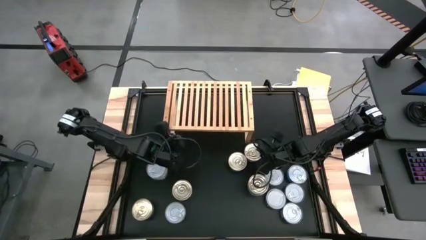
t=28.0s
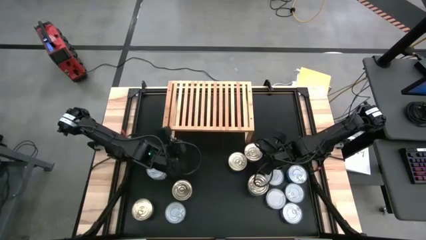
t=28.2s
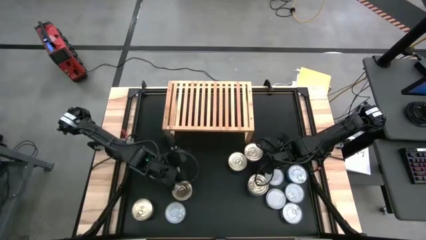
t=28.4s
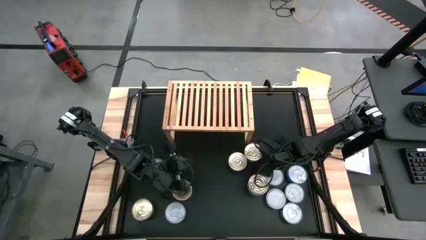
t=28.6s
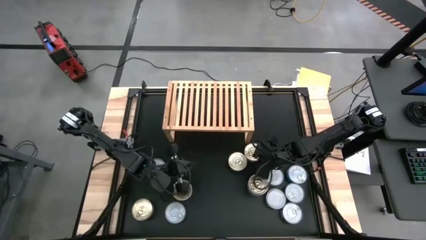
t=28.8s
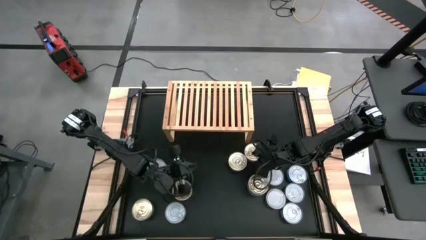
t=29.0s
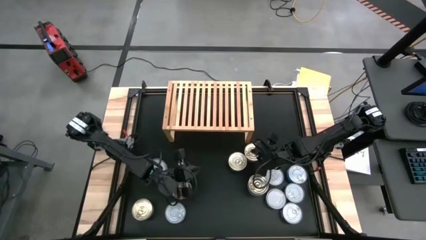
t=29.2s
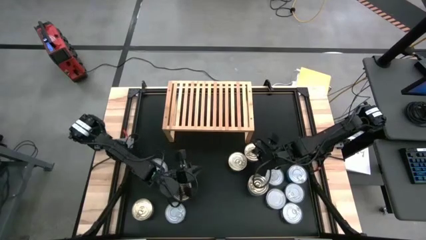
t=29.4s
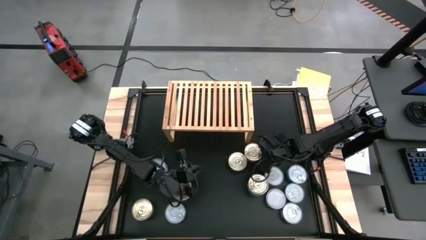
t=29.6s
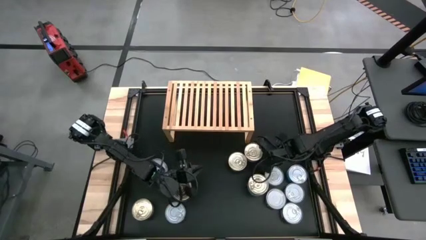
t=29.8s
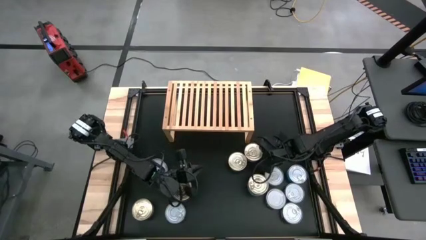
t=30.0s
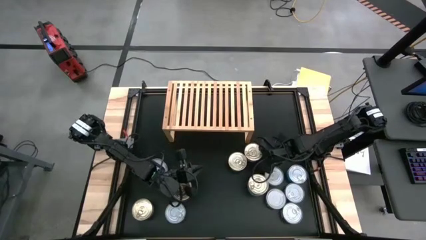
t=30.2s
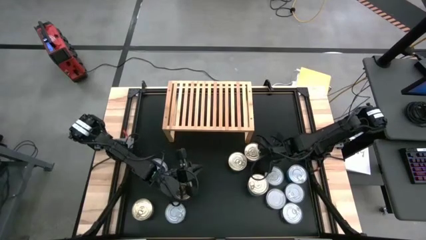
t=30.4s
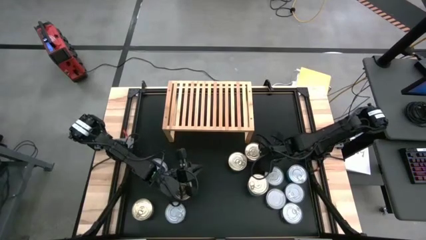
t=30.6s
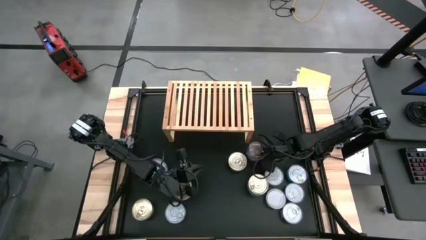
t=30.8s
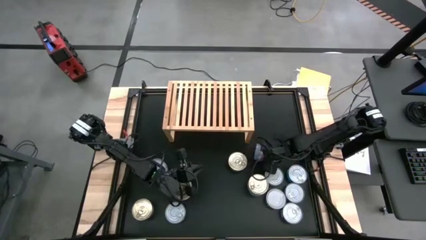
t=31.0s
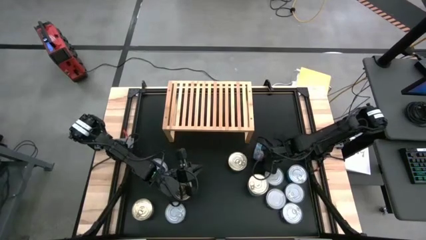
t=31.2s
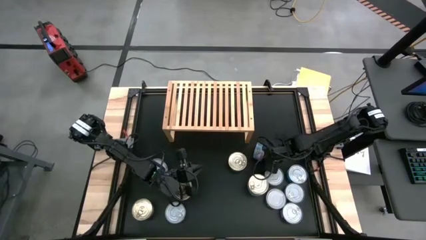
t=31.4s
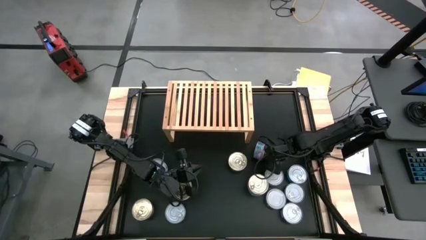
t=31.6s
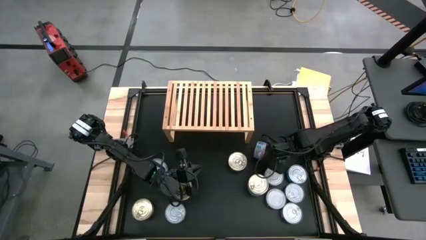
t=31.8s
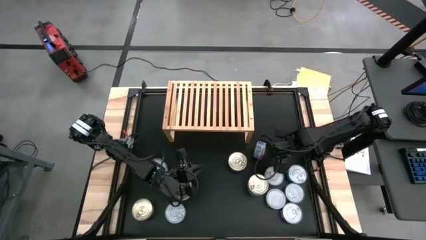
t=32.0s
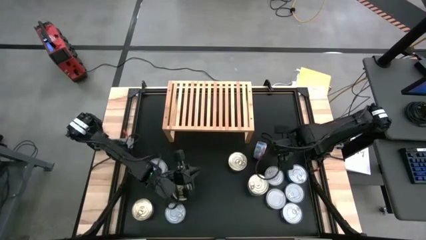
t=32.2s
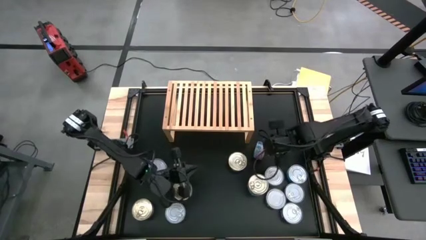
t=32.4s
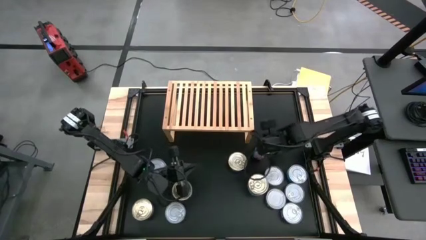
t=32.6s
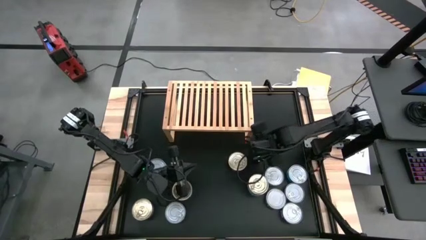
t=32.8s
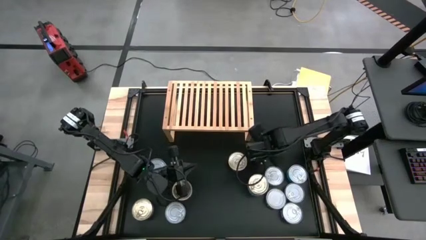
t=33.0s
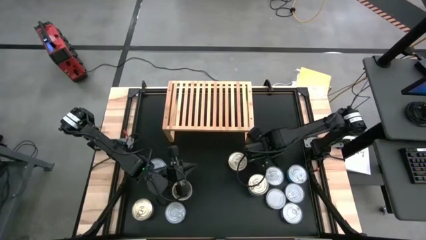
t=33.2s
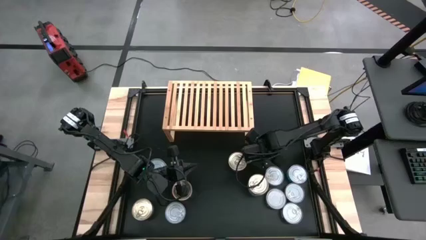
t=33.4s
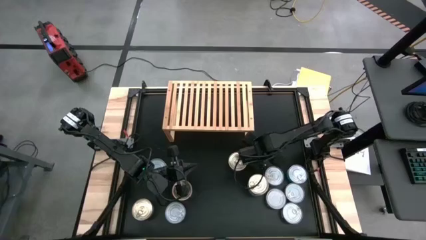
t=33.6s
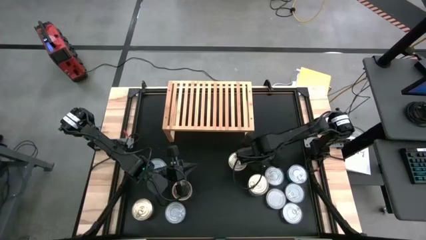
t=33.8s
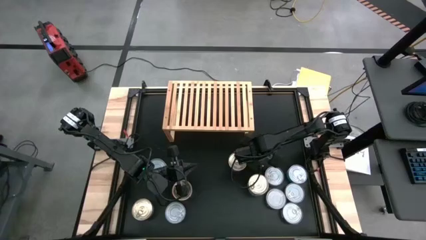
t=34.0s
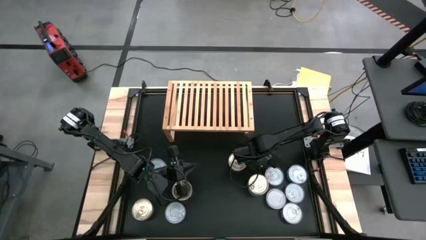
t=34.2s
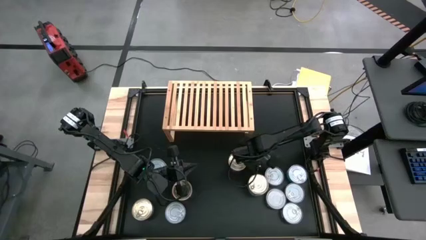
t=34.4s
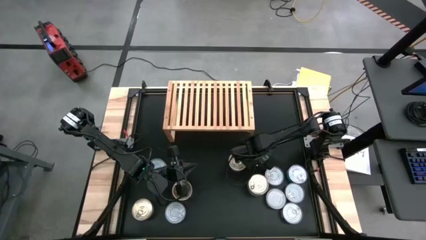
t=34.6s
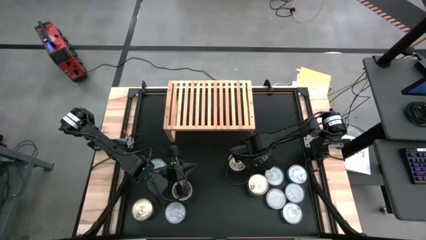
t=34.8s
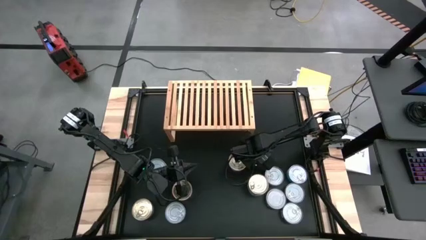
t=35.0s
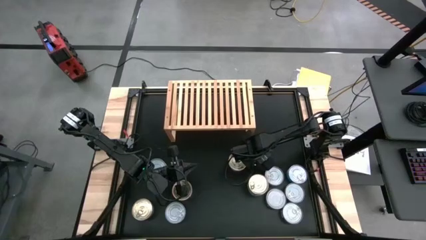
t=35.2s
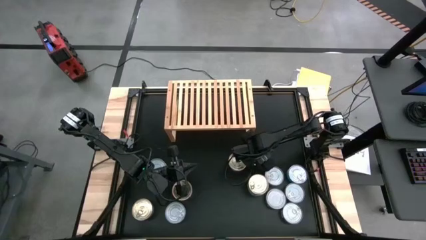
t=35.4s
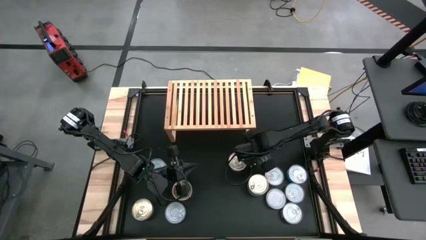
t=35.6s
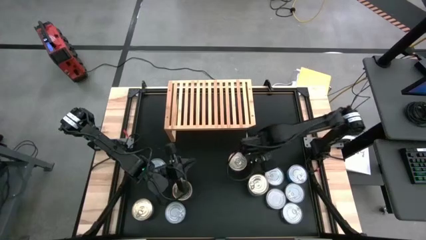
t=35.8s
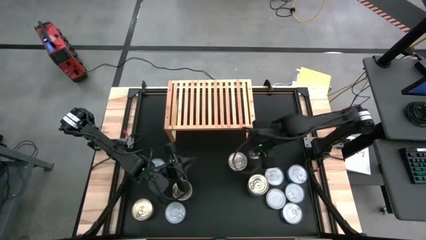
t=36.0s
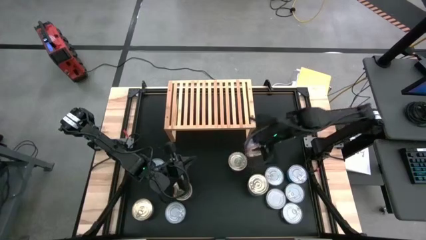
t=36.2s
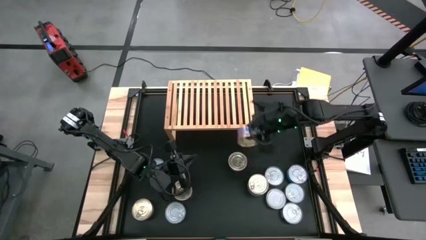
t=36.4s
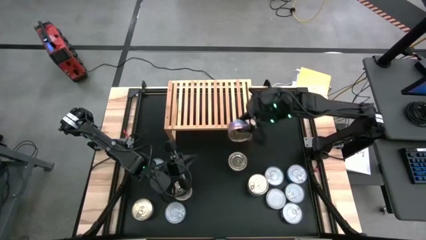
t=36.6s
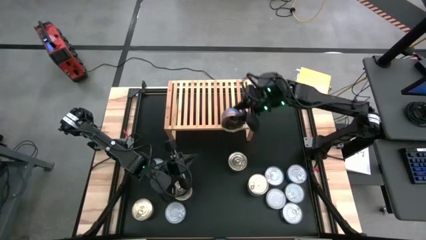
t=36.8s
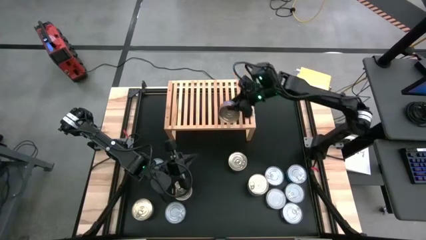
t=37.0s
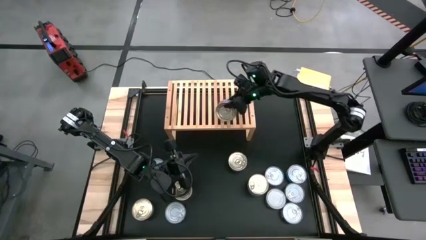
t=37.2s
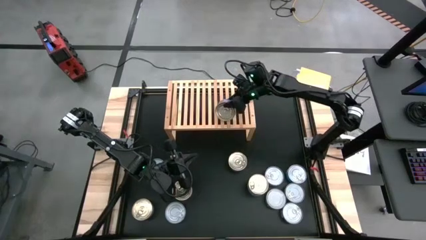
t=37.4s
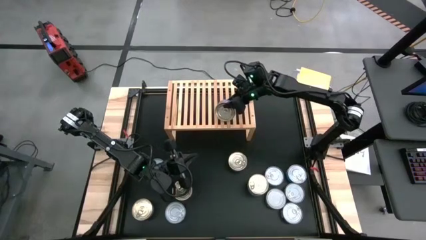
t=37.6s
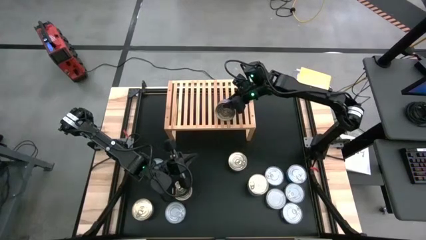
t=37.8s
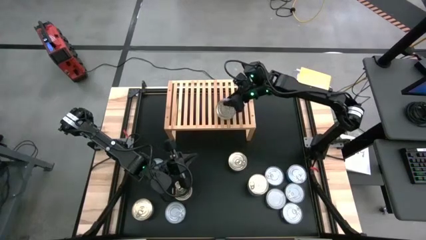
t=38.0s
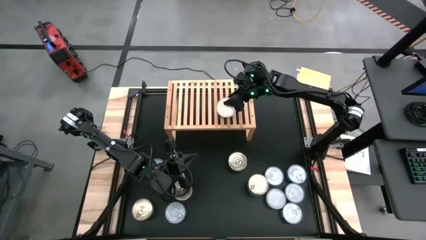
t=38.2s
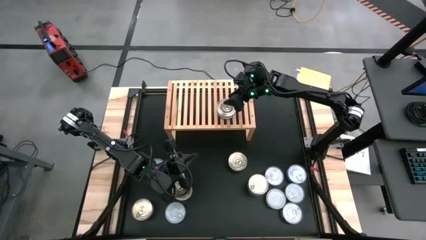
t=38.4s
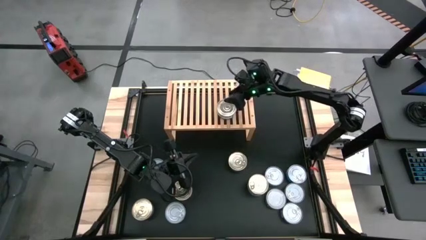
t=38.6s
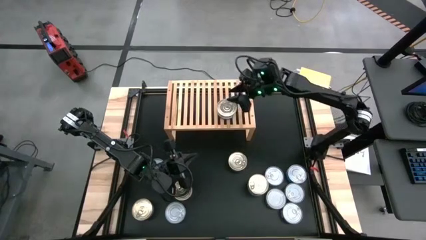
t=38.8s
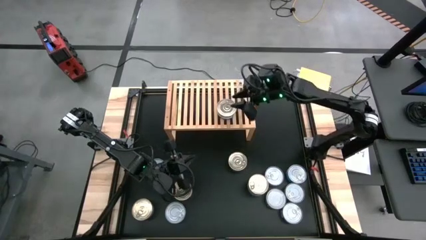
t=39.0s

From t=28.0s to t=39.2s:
Task: Stack canned seafood by type on shelf
Put the blue and pink tuna can on the shelf

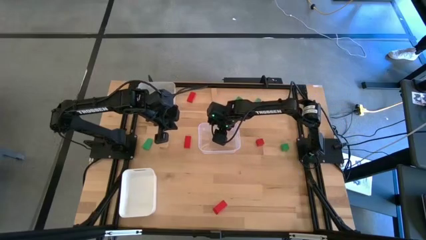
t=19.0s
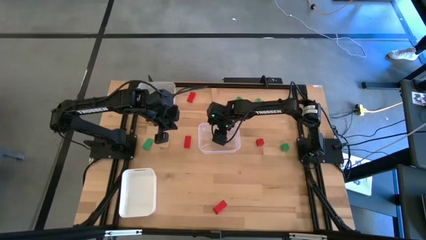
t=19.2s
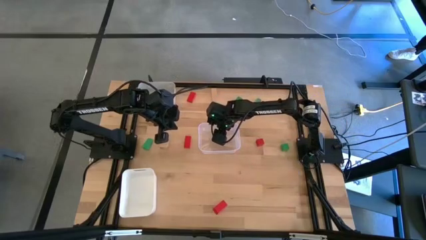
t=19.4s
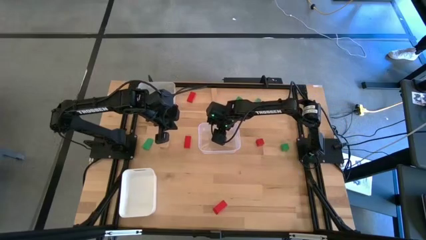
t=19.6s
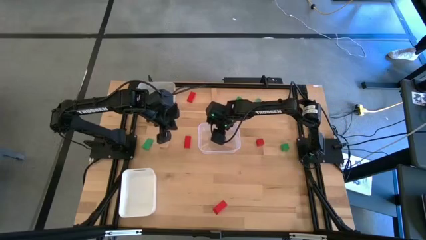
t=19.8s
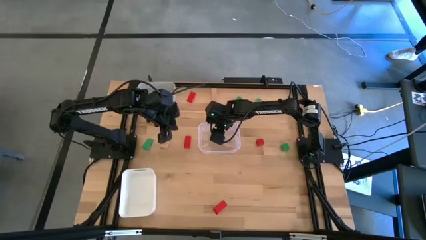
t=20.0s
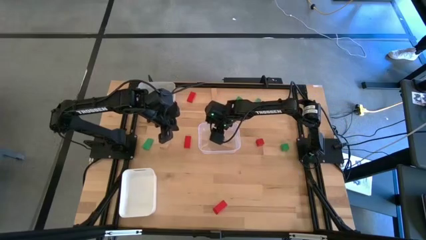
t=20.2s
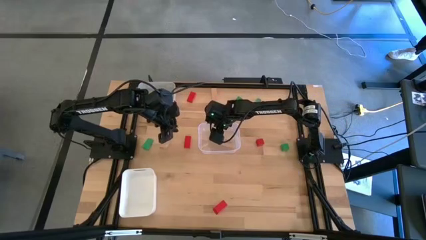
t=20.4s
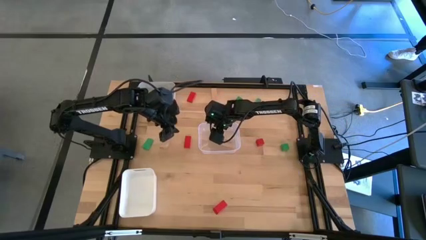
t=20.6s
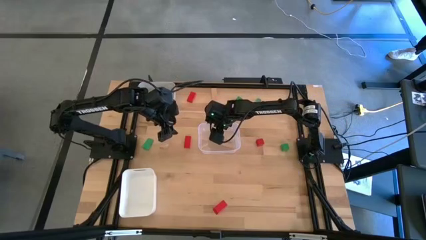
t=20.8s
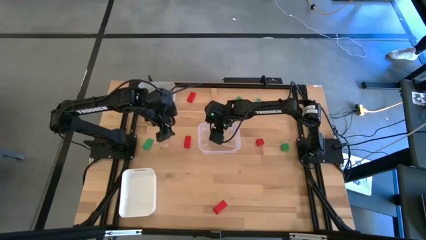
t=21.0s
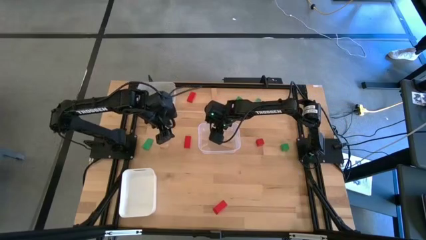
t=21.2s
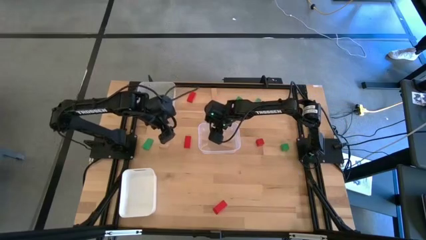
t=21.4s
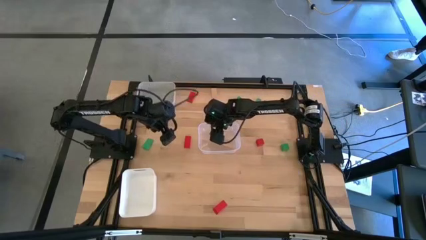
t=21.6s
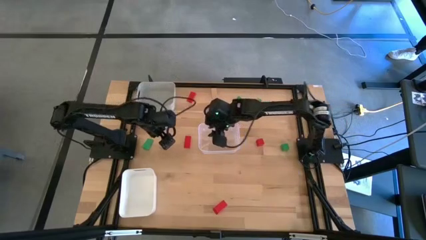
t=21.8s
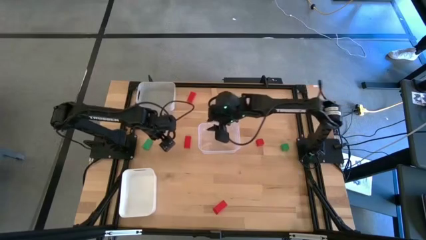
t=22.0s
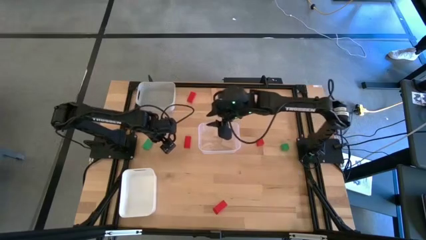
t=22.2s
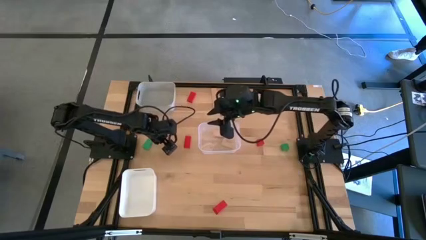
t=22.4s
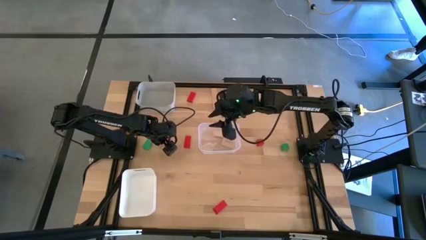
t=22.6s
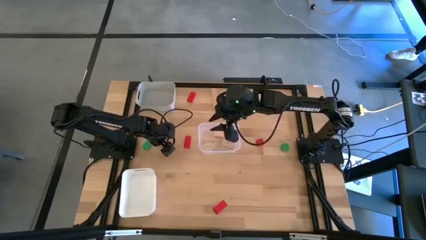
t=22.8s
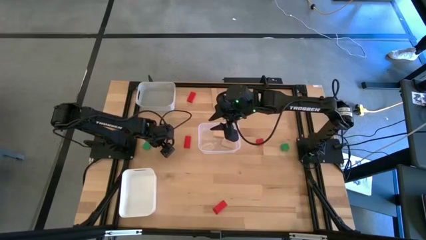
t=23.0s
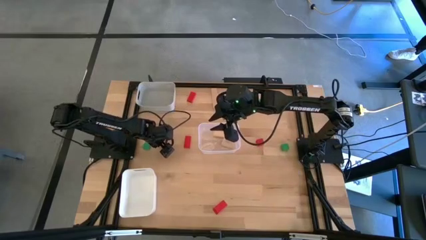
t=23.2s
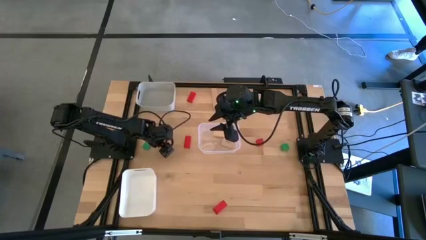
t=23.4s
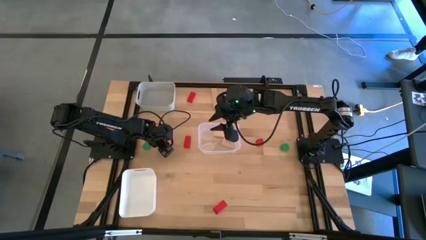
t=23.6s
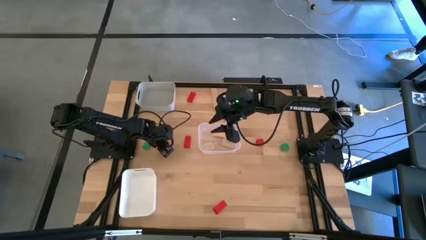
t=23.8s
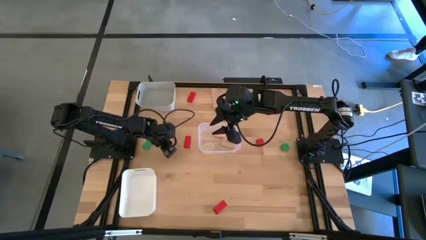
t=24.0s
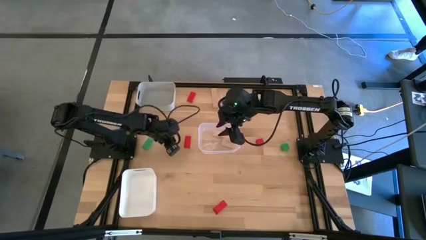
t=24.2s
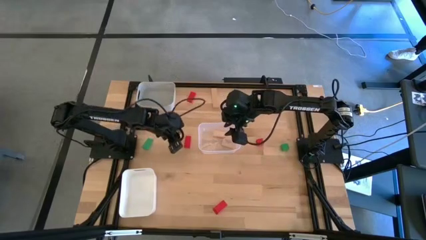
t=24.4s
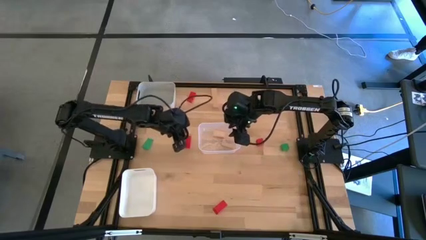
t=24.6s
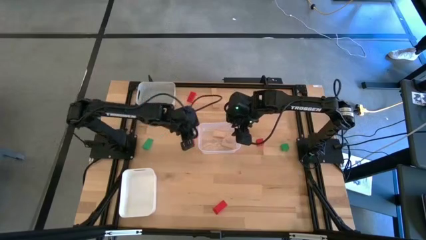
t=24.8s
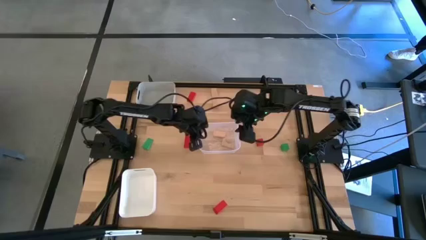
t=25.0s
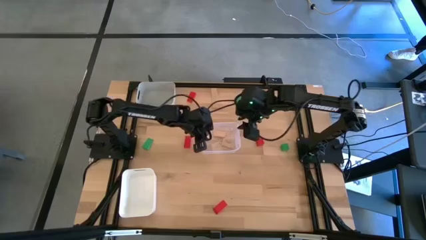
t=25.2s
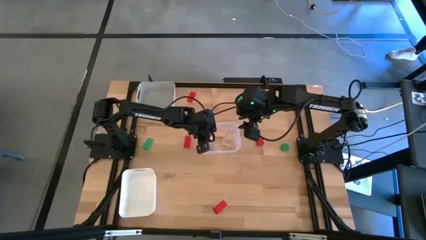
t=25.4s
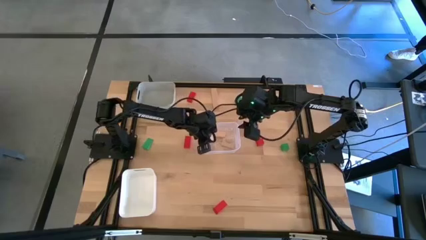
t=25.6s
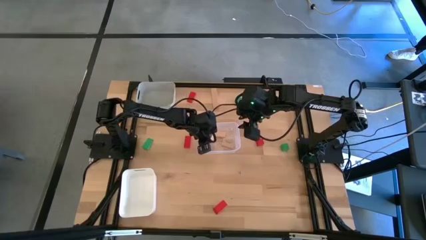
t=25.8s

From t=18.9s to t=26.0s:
Task: Sort & place blocks by color
Put the brown block into the transparent bin
